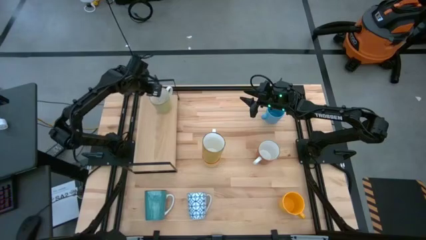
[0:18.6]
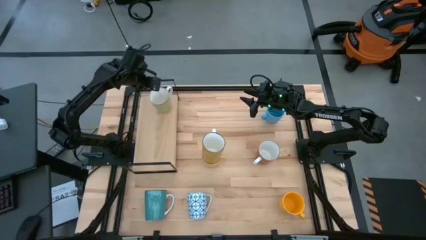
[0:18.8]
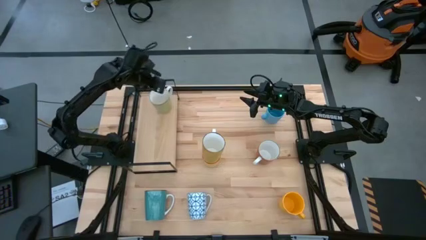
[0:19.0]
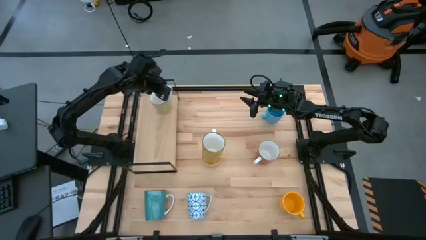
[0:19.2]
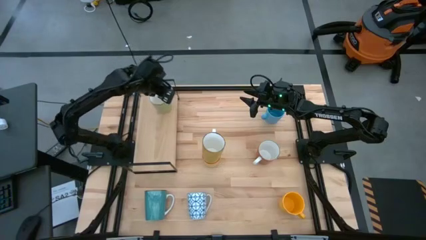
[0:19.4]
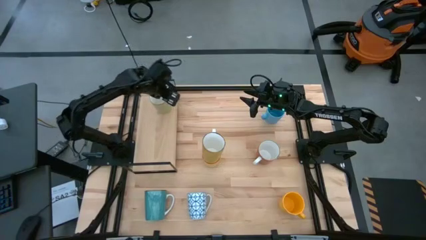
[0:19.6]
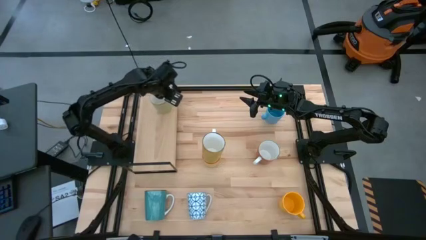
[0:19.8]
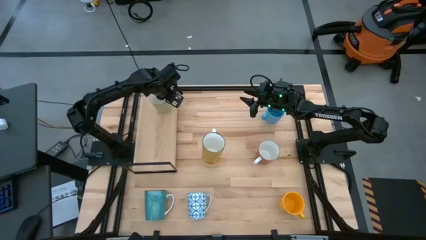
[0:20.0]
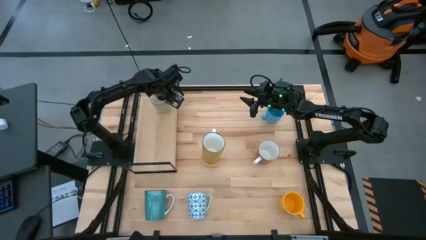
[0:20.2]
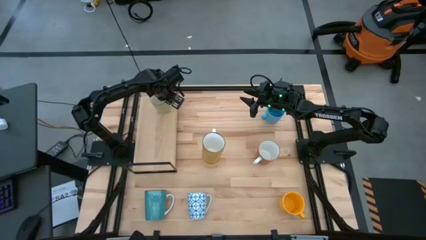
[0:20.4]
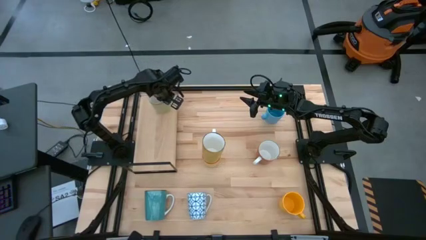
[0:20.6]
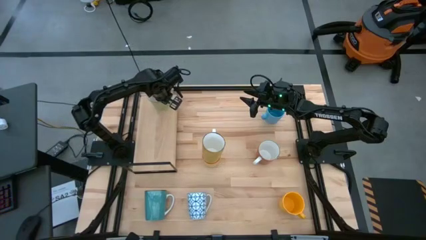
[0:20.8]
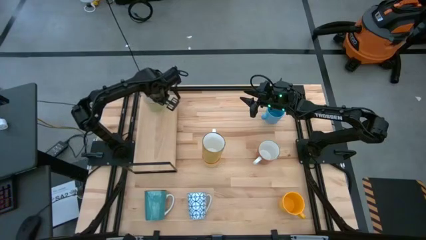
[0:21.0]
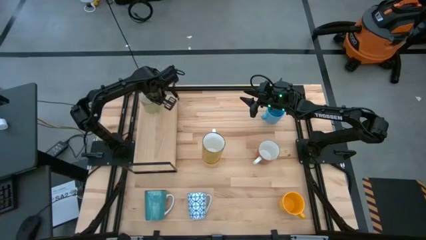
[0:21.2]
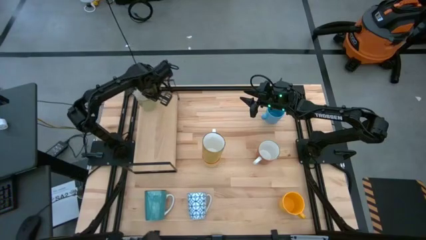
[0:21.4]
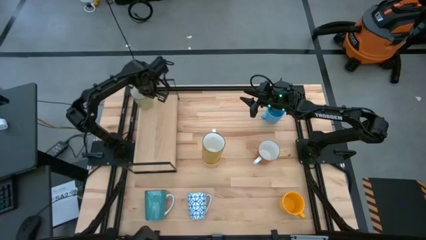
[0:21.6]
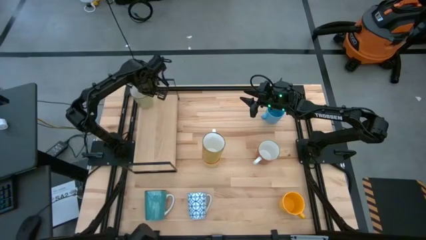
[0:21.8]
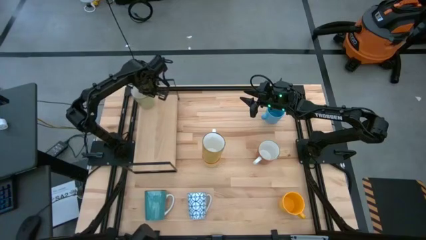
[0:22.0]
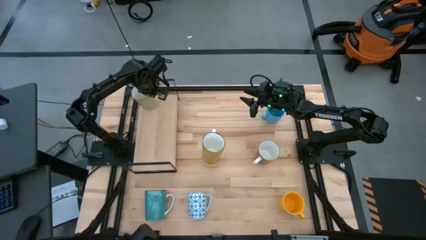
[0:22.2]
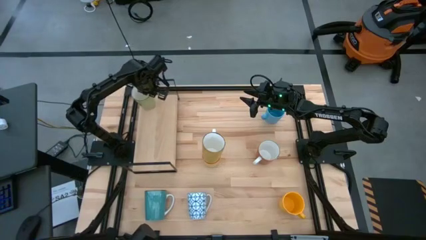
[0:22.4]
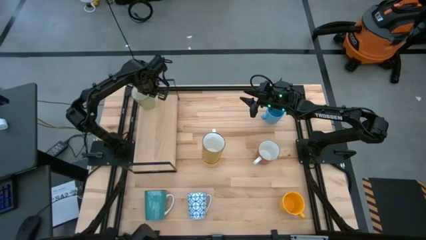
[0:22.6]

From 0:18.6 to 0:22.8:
Task: Place coffee mugs
Adjust the light green mug on the shelf

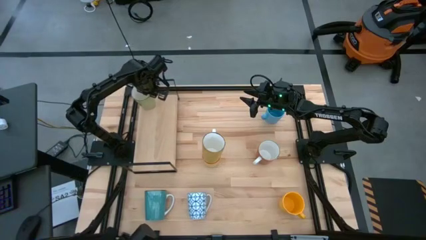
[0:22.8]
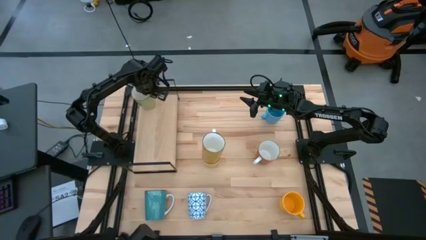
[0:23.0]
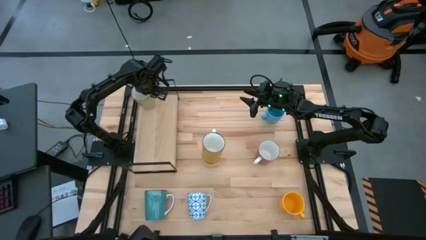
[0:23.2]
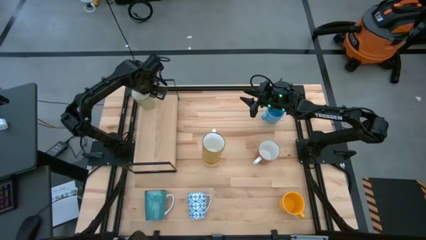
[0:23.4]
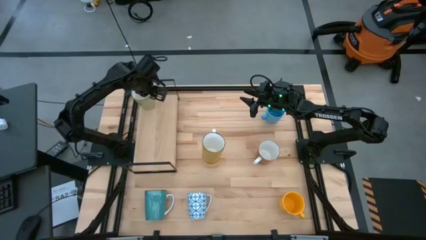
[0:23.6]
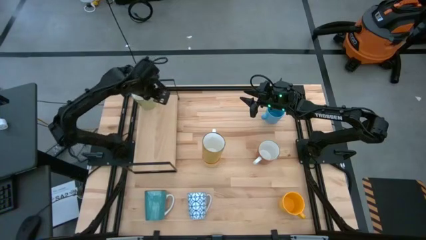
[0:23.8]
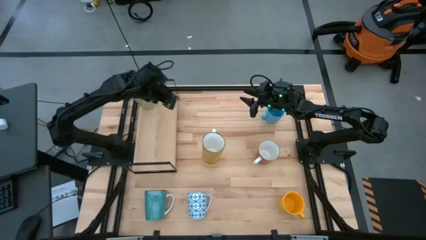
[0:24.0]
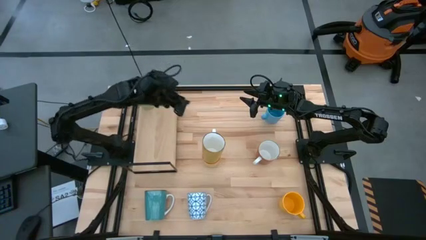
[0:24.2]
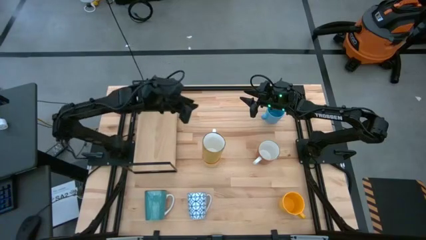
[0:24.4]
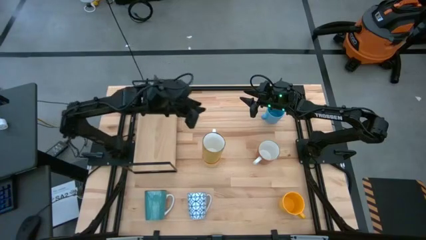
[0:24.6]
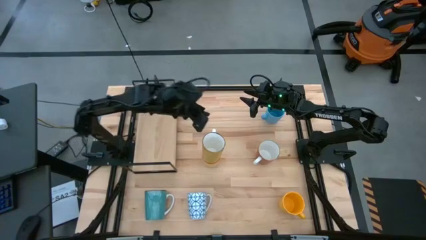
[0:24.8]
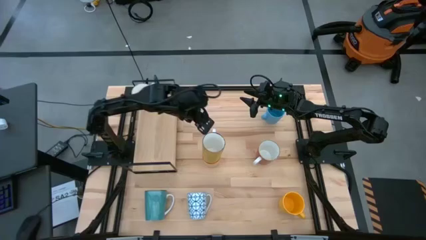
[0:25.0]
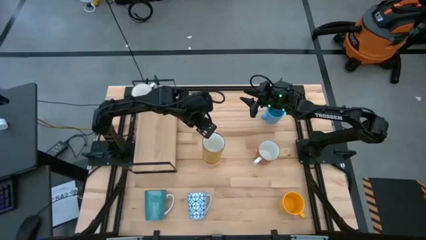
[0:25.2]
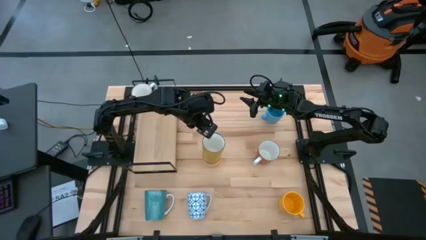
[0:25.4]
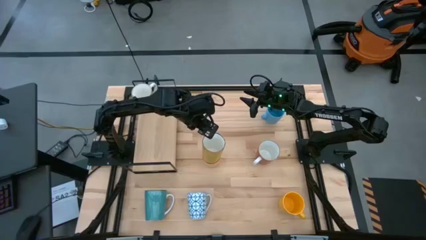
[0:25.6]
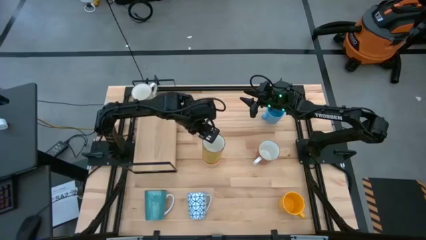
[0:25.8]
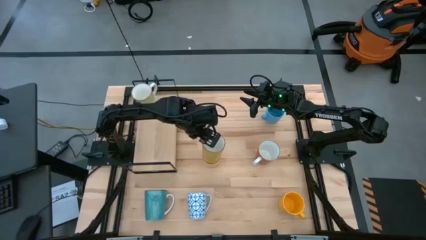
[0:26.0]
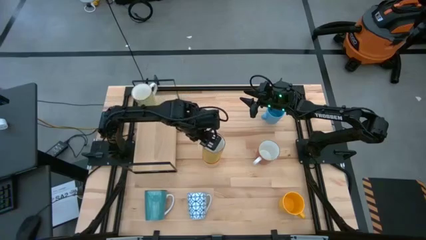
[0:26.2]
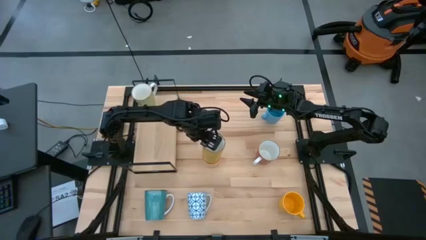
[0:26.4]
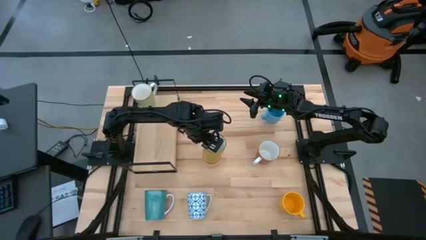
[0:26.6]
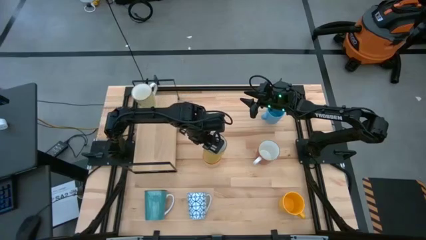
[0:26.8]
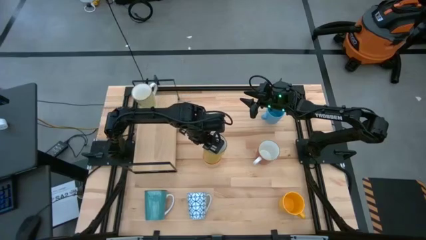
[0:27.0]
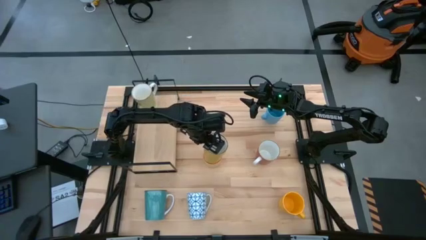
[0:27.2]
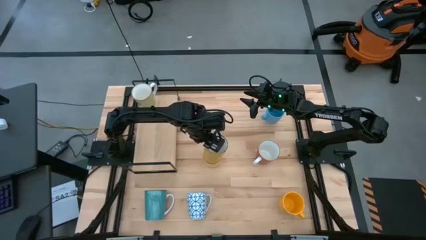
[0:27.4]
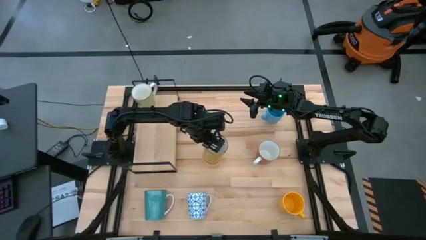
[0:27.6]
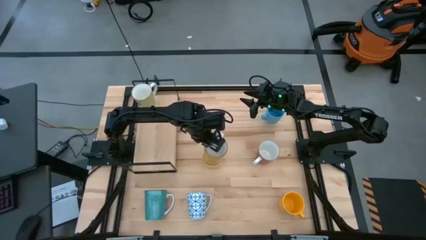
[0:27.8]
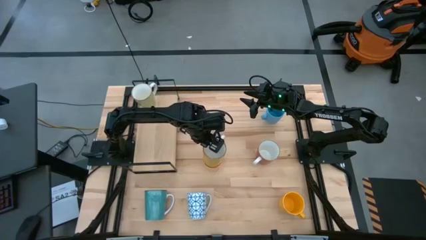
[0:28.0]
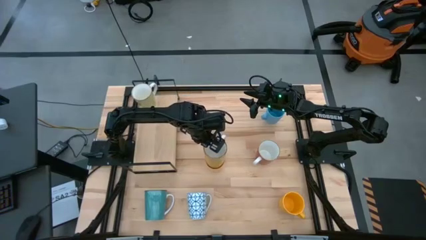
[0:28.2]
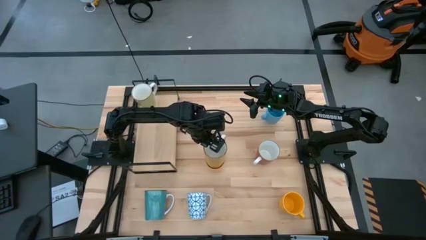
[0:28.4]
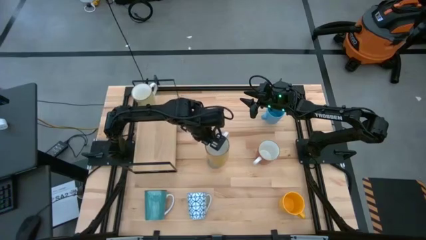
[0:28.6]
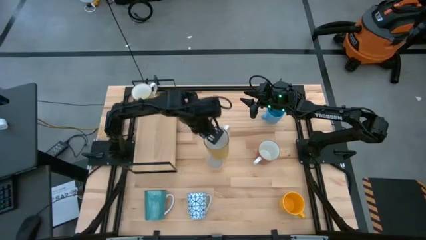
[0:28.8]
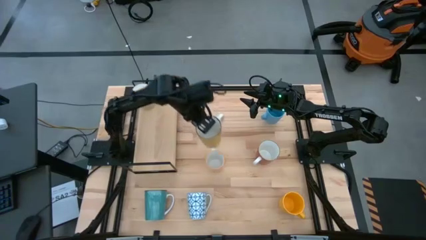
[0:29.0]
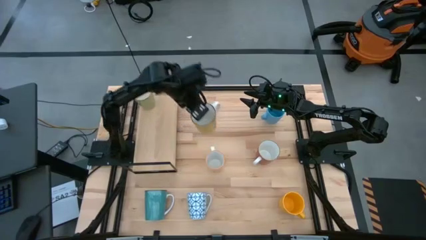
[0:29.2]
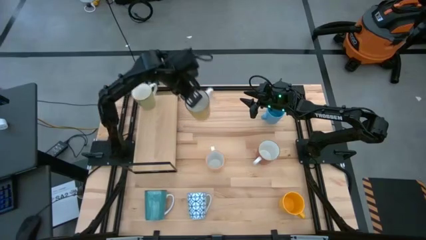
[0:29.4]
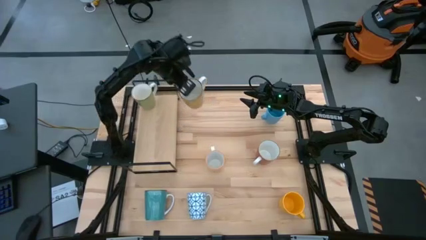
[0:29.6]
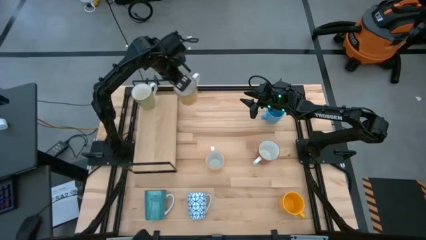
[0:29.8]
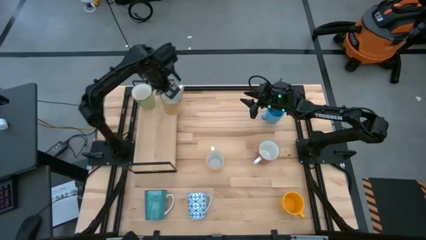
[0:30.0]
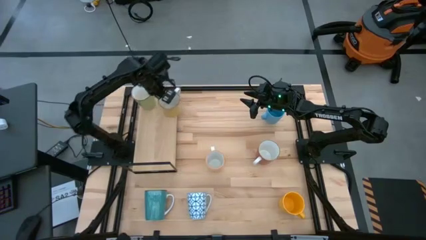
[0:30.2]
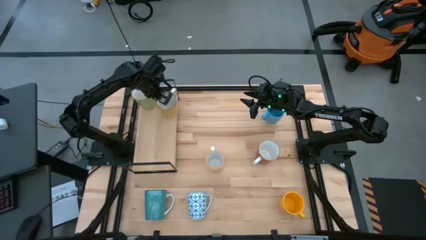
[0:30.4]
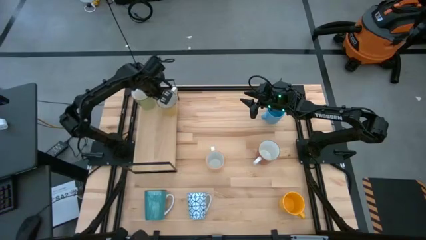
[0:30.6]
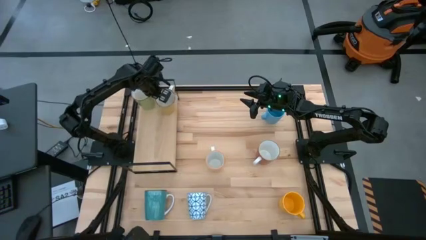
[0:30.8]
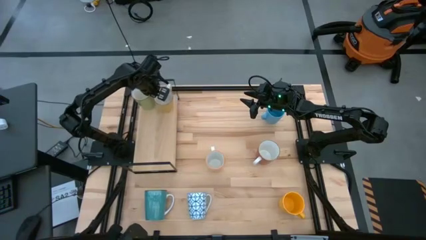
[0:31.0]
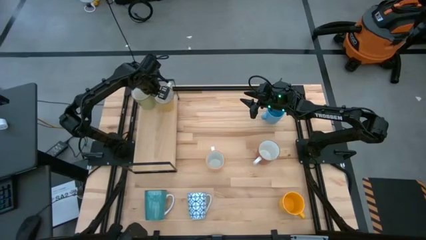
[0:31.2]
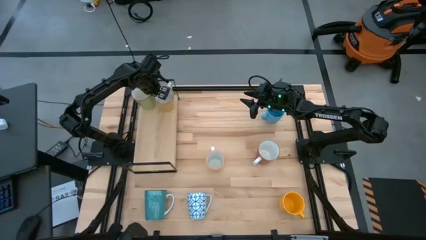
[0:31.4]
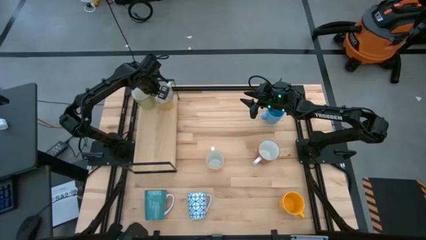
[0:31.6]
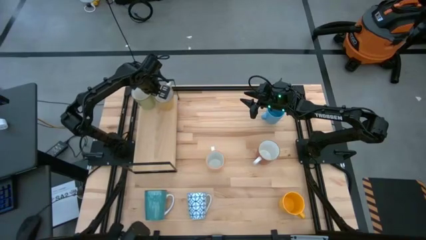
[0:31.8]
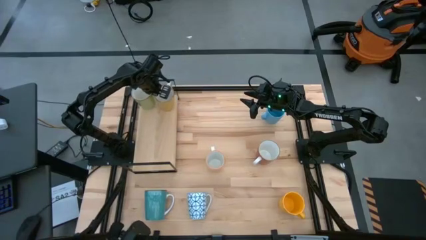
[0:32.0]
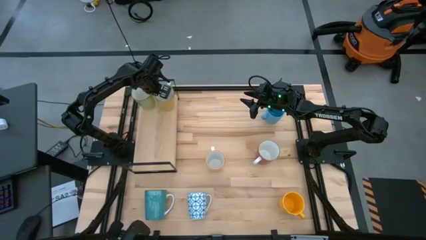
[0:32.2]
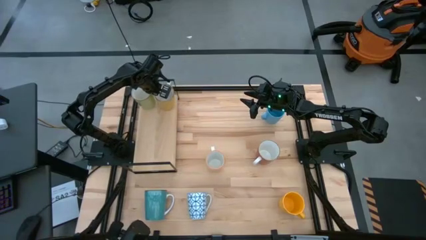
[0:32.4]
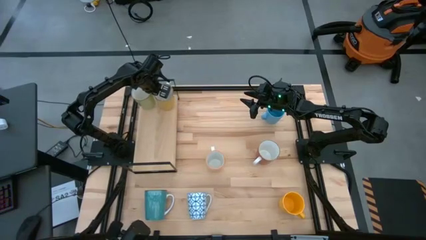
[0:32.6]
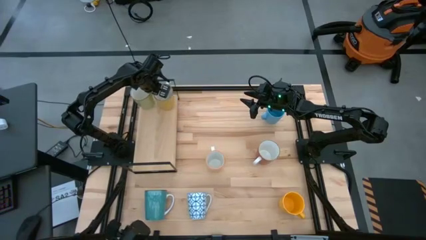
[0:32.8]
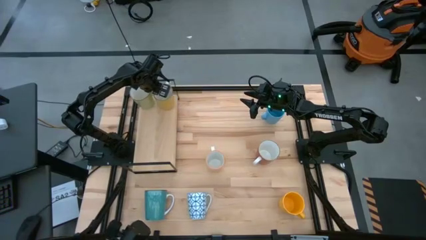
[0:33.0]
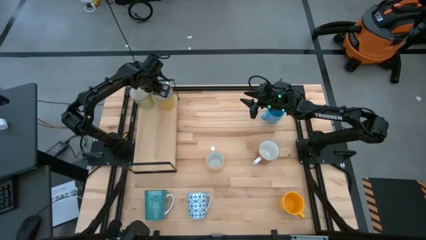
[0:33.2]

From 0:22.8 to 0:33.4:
Put the yellow mug on the shelf

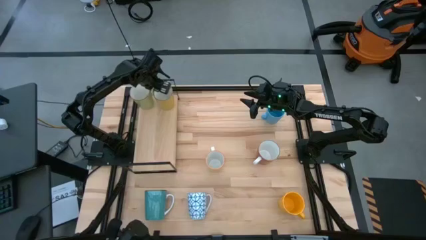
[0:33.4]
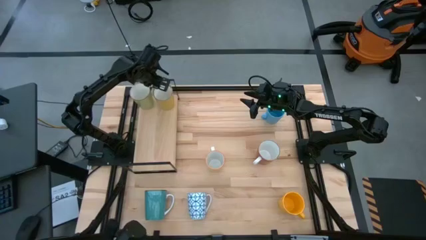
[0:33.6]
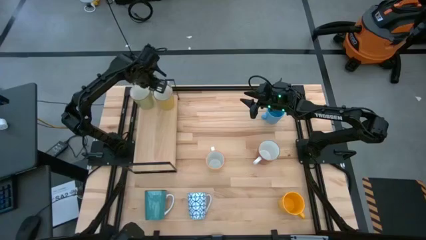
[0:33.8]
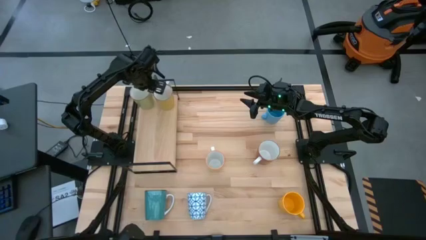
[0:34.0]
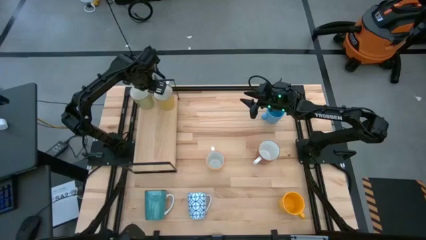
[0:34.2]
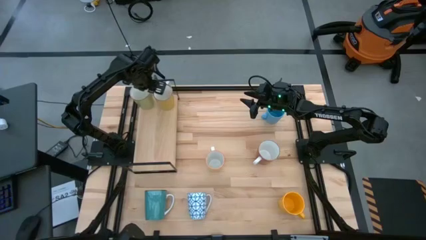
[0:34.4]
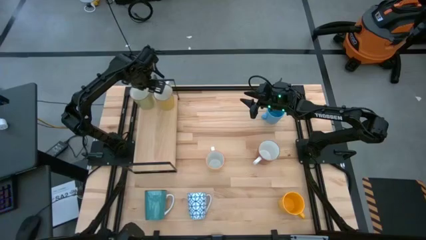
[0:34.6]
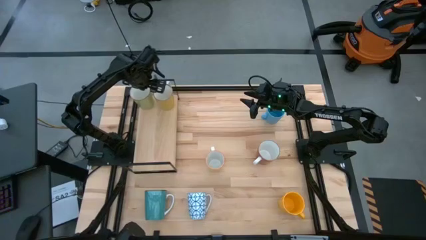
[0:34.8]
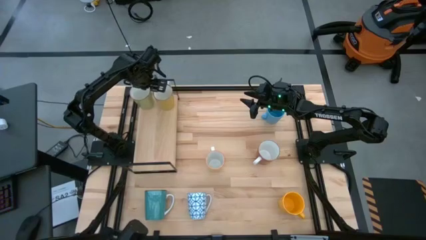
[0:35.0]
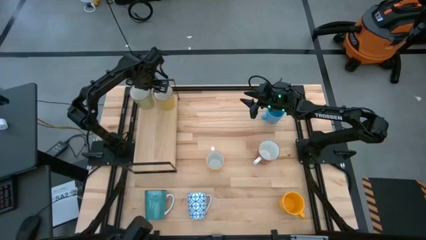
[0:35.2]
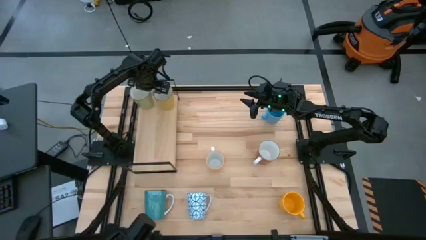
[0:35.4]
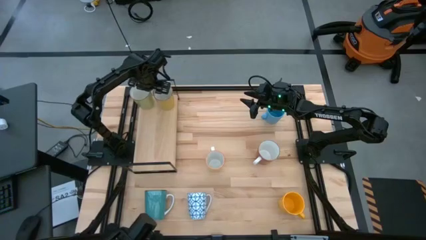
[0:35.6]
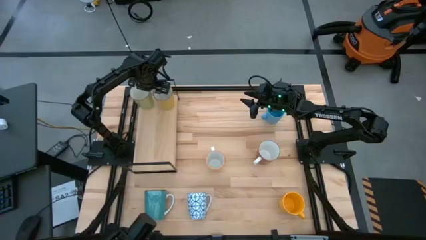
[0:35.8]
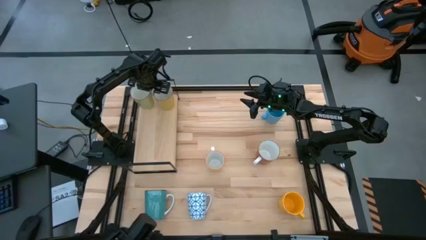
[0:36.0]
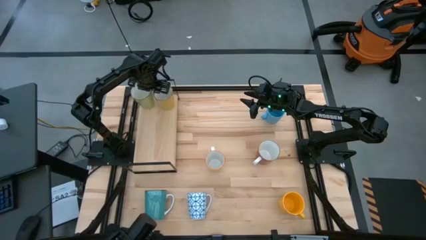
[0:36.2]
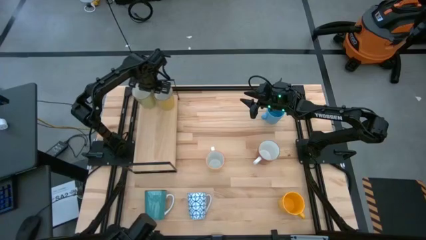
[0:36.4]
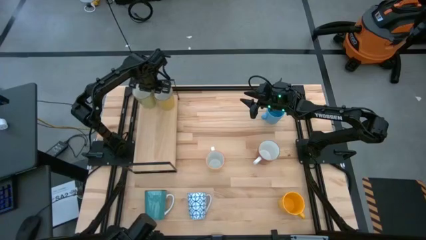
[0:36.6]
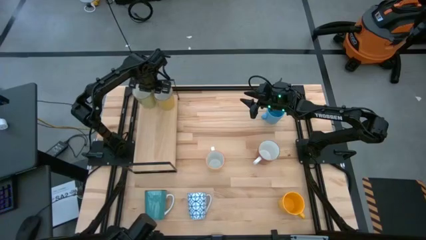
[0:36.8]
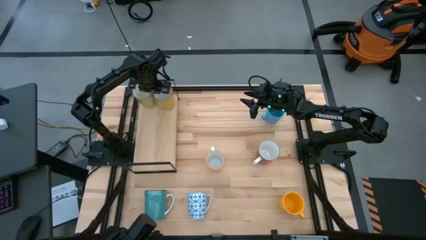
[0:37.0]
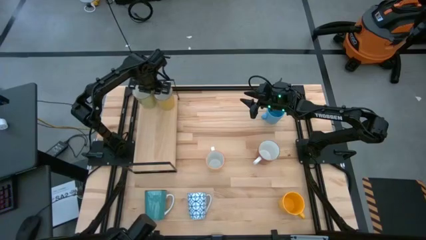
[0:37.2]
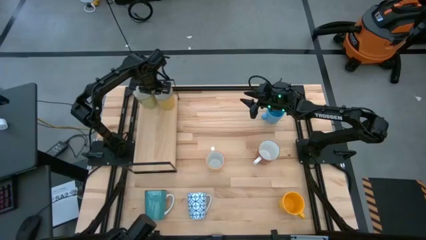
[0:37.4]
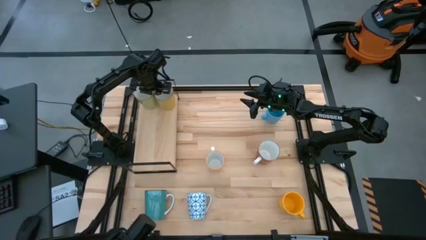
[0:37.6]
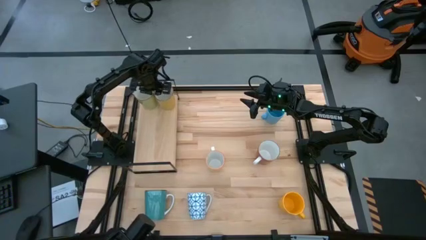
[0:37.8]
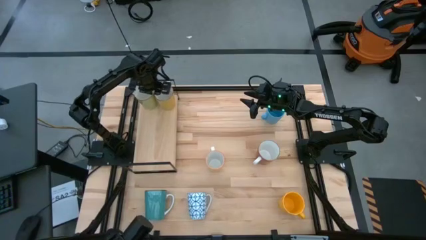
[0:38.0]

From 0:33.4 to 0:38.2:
Adjust the mugs on the shelf
